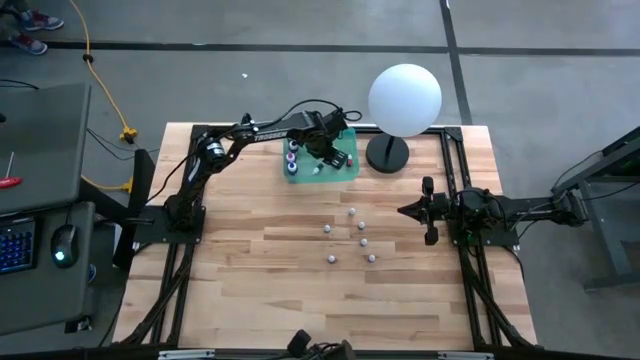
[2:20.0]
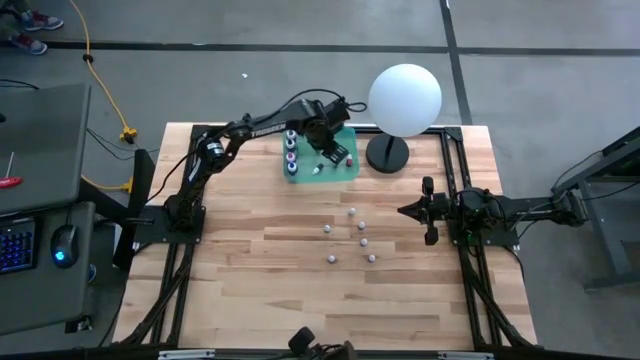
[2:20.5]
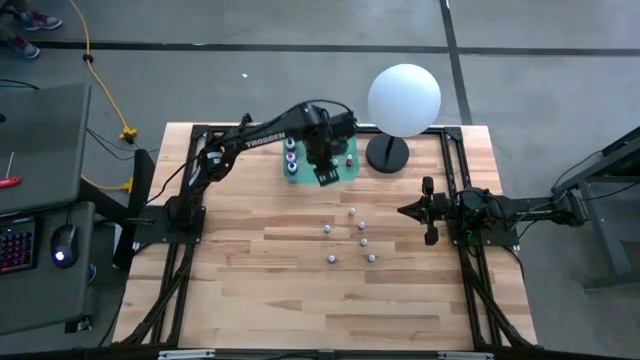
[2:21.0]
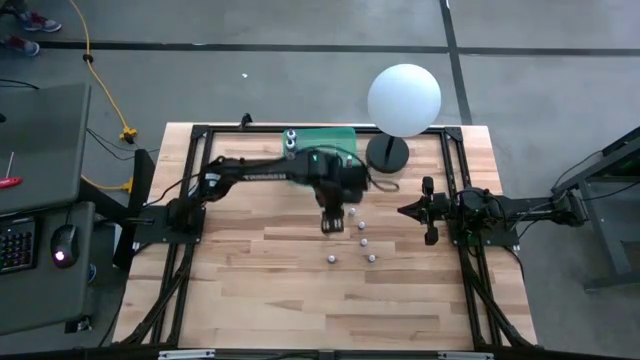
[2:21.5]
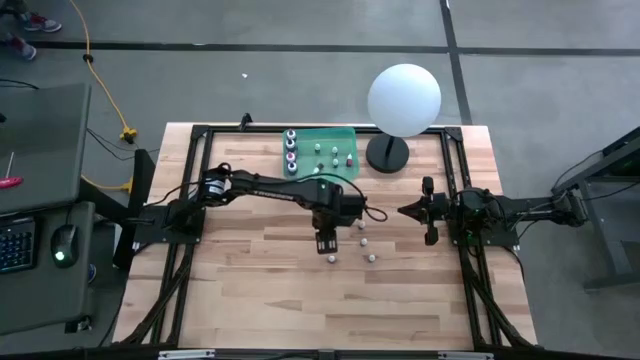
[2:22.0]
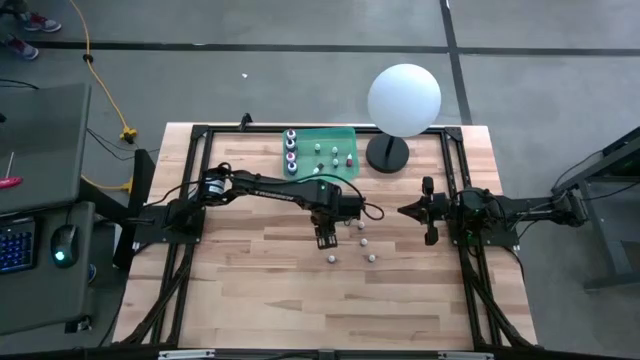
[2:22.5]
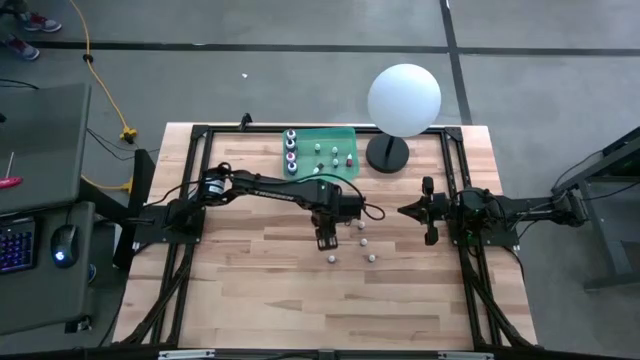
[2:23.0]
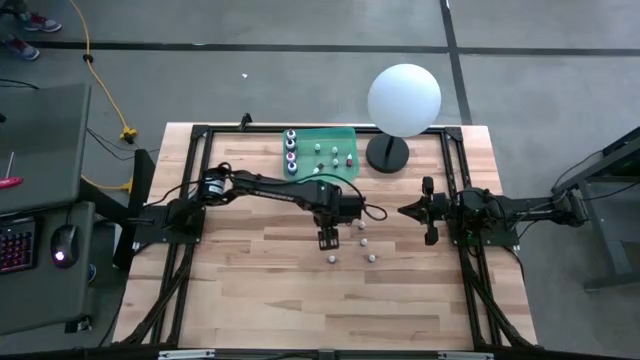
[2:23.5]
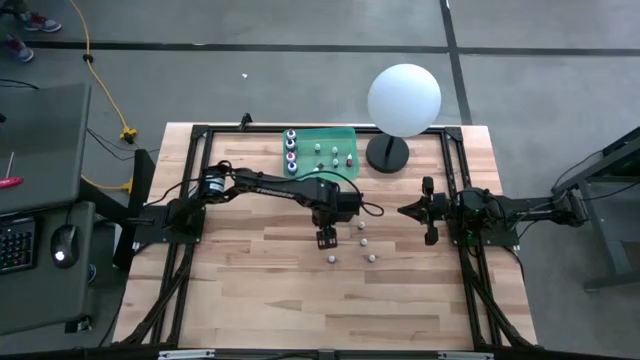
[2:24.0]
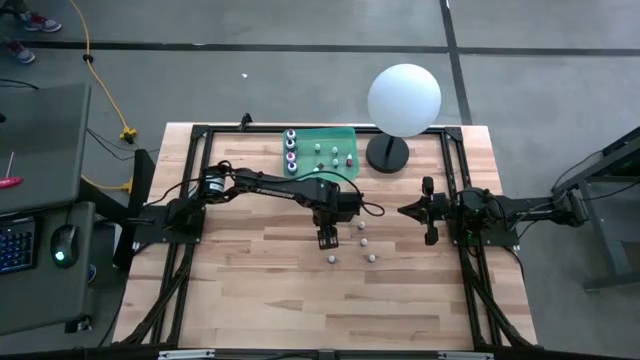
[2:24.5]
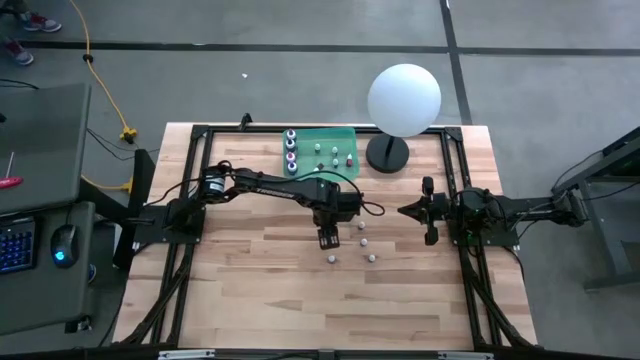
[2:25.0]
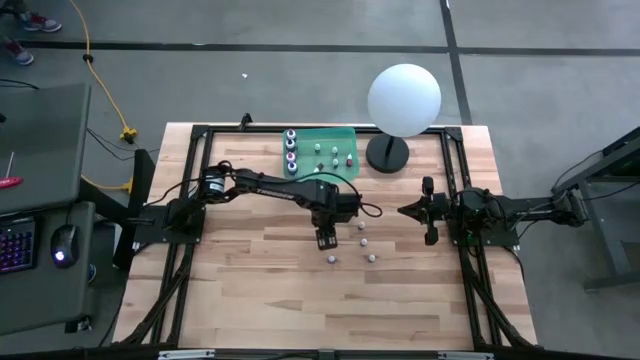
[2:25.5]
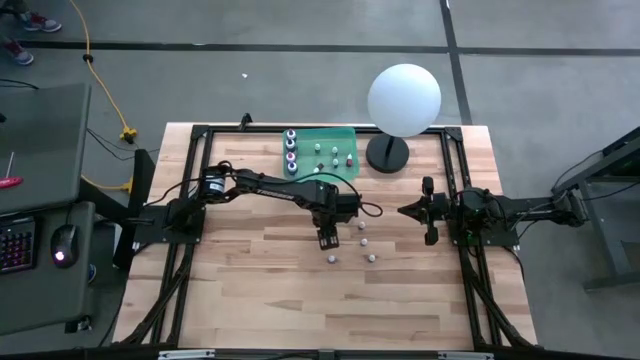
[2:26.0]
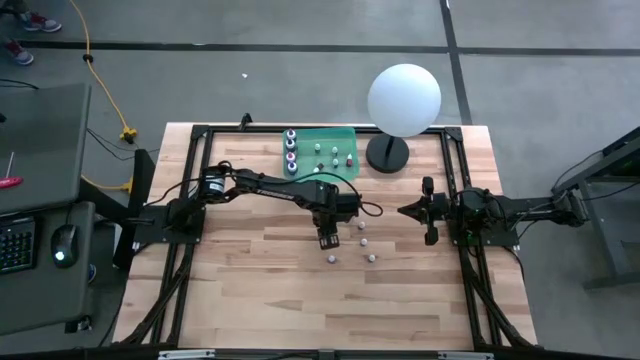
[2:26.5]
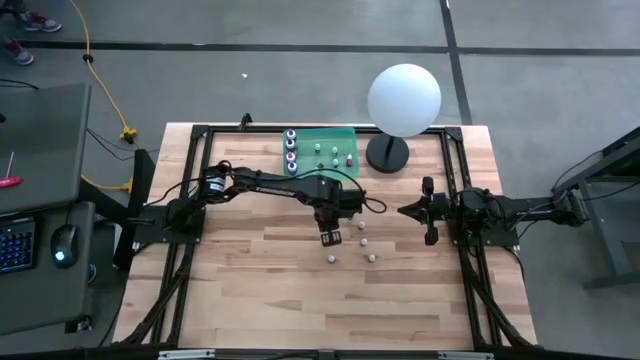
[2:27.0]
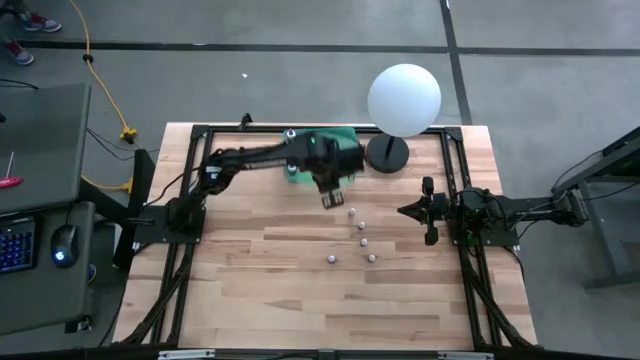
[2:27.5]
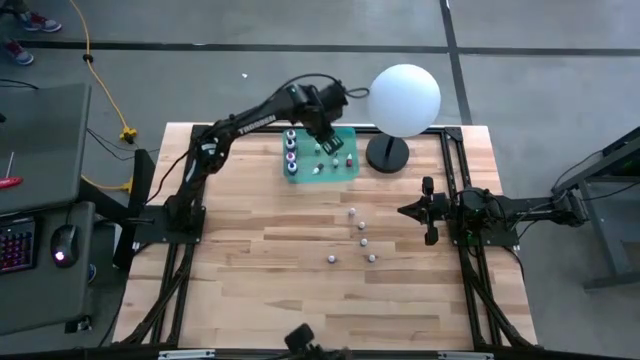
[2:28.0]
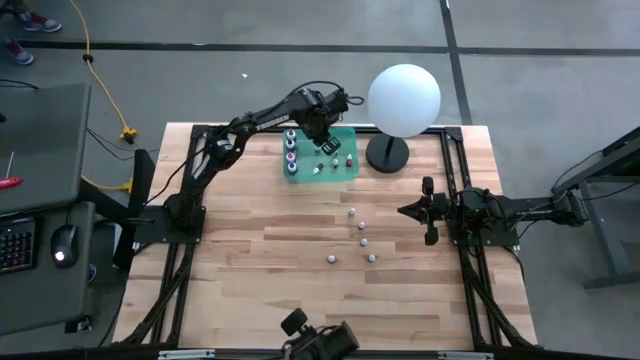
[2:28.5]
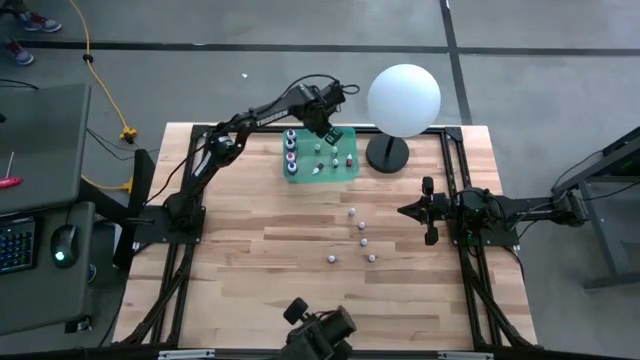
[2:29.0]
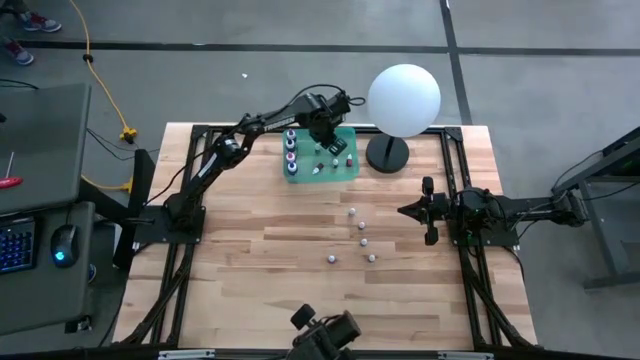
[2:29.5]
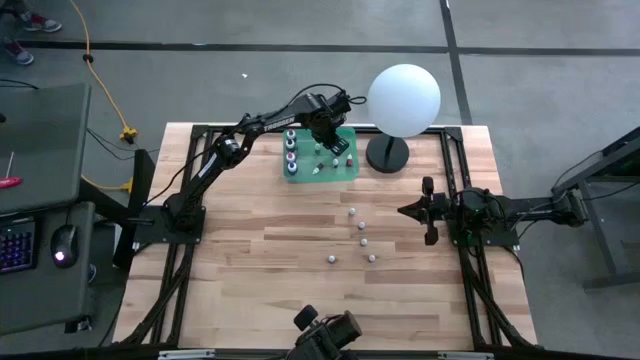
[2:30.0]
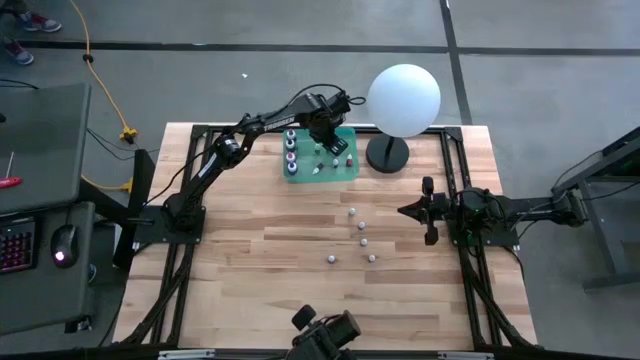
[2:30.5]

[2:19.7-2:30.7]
Task: Pick & Place food coloring
Put the small blue food coloring bottle into the green bin

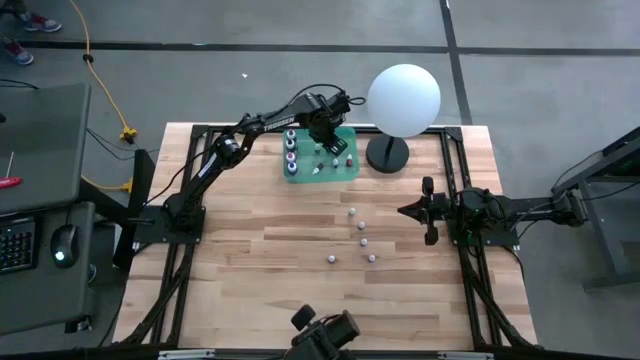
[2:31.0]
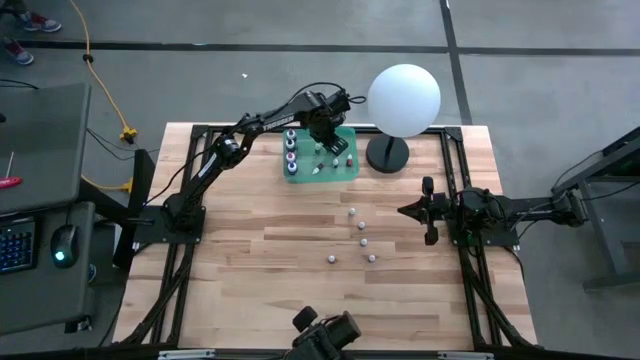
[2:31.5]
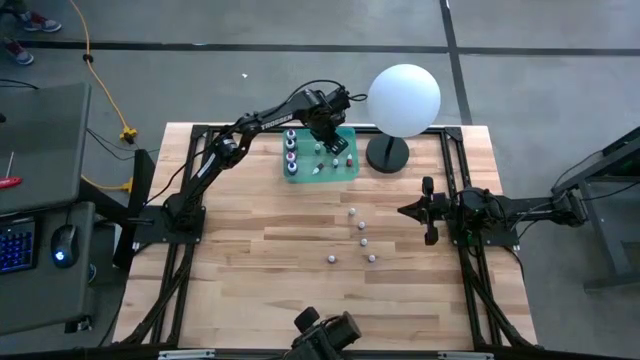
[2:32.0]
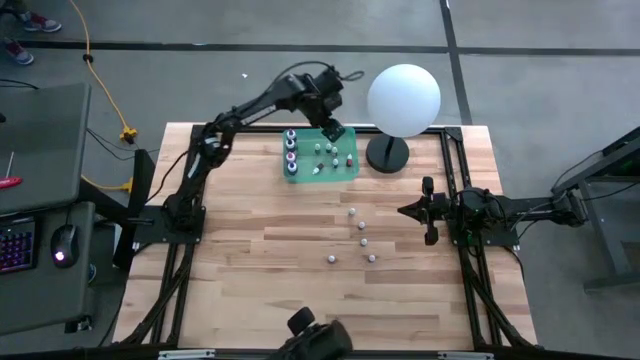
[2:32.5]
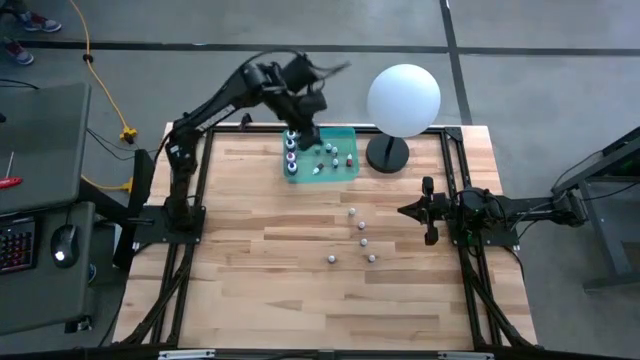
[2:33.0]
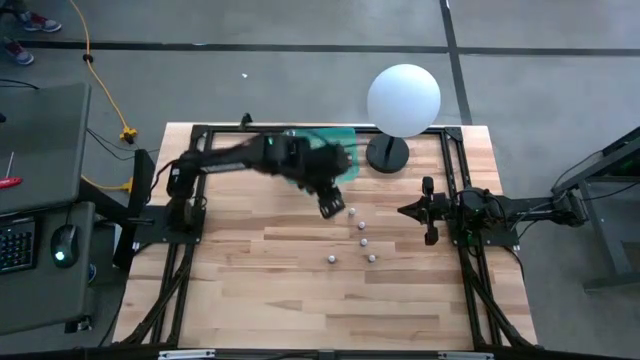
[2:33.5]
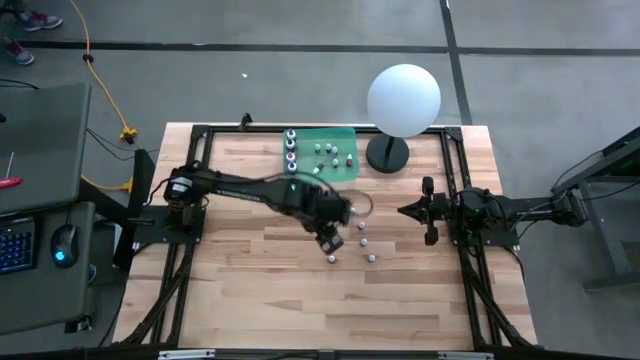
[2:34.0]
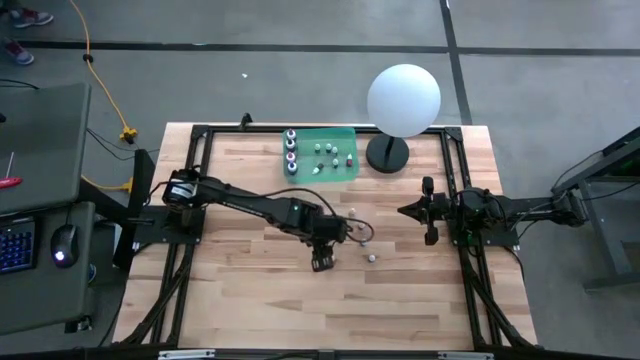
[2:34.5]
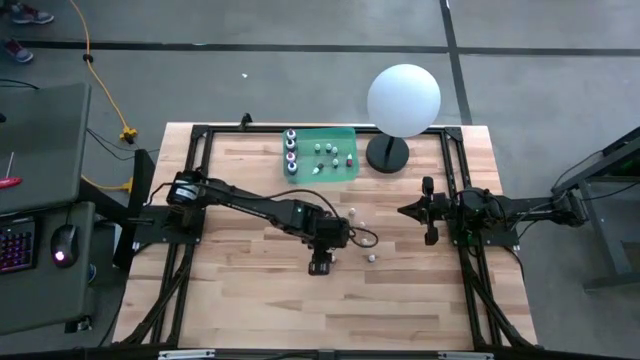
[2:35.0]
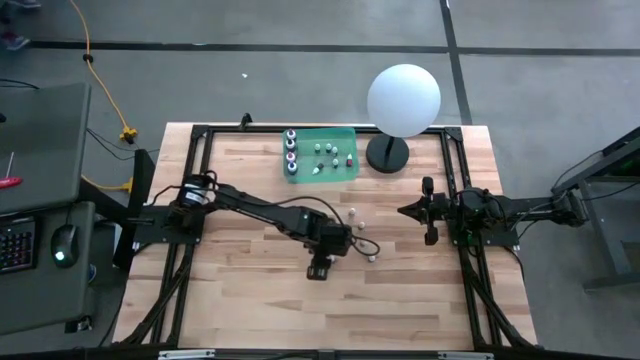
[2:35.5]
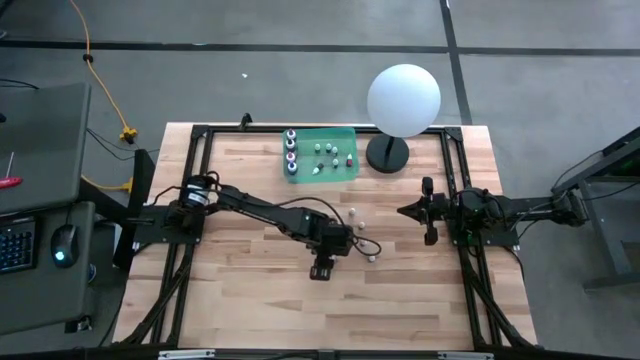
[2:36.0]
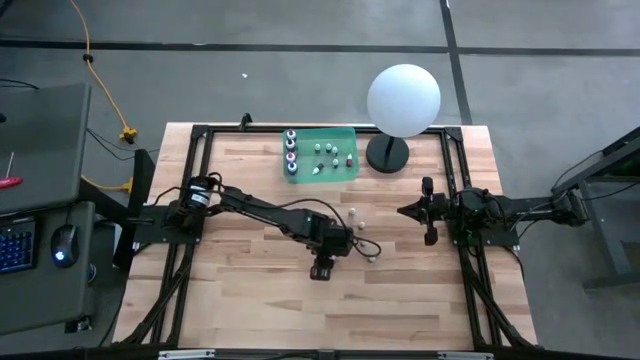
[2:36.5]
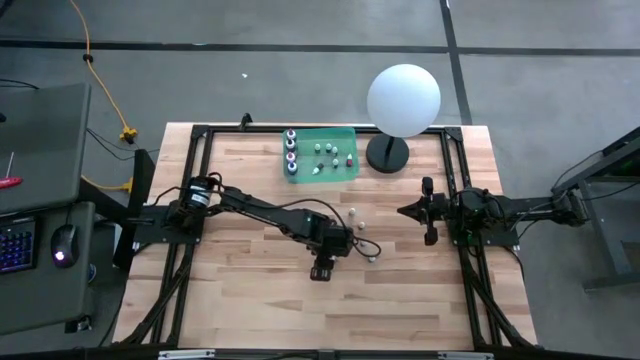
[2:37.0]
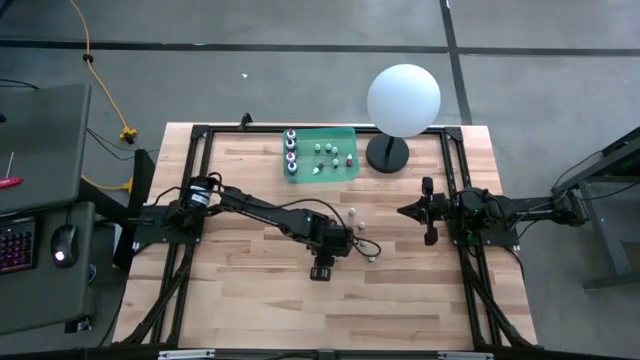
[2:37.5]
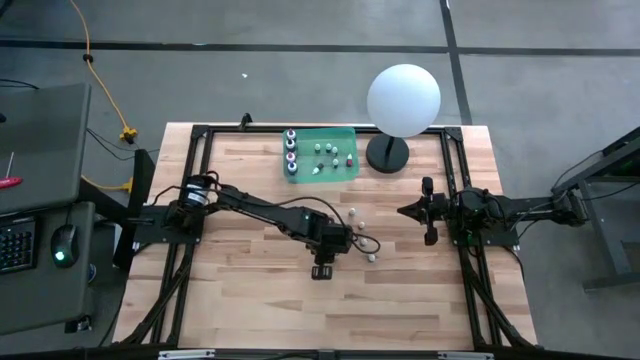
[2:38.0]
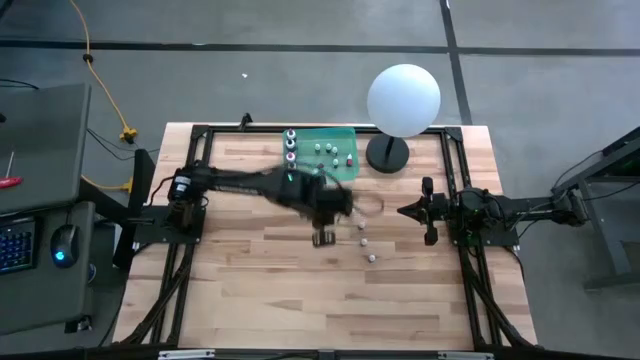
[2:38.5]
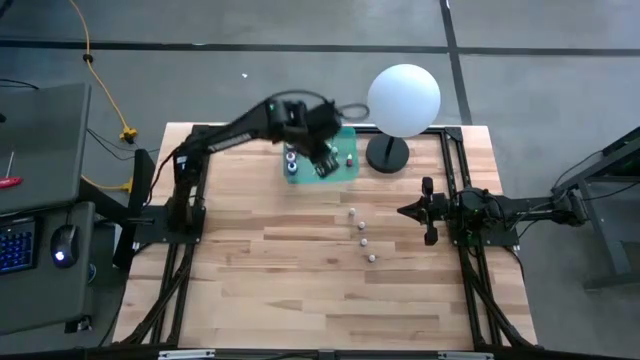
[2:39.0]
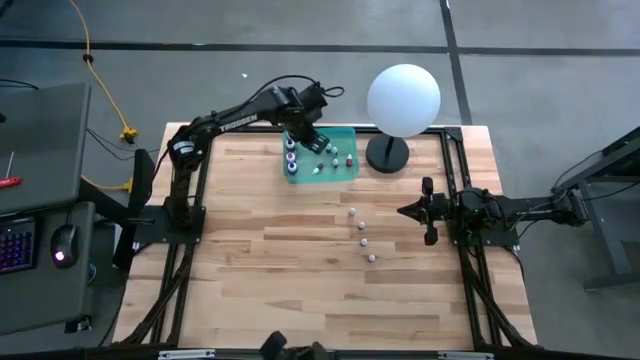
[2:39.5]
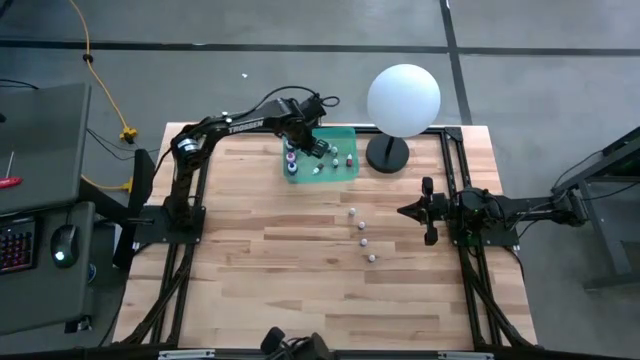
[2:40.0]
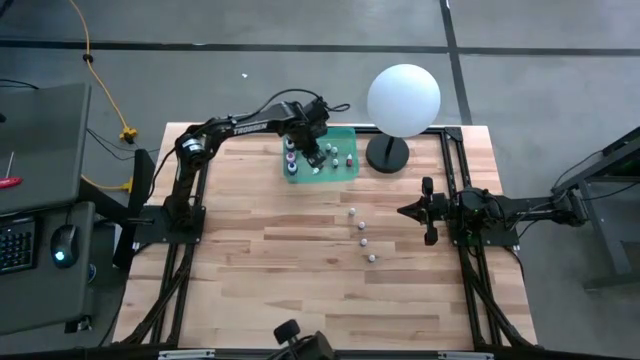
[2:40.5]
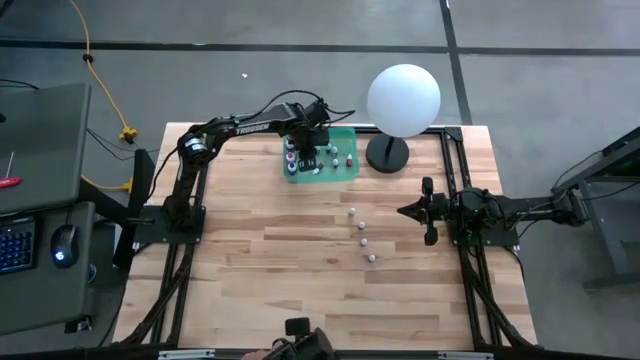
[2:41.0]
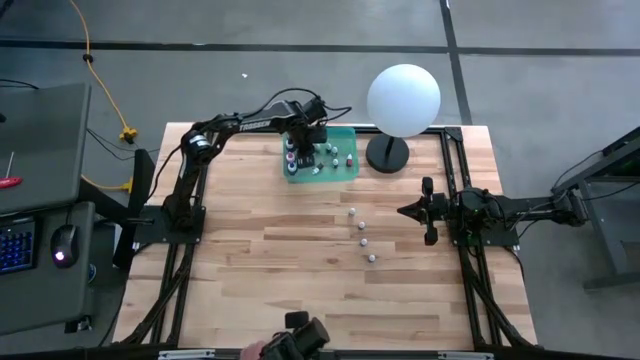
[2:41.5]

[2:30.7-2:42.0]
Put the purple food coloring bottle into the green bin
